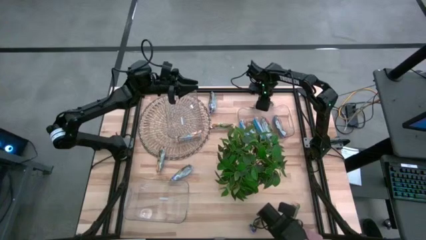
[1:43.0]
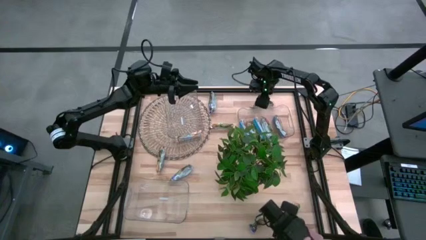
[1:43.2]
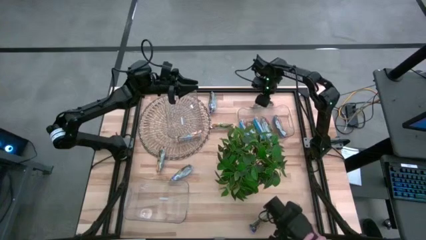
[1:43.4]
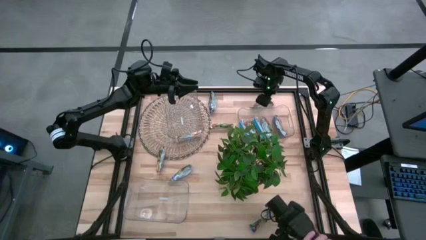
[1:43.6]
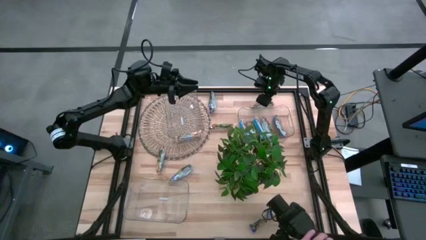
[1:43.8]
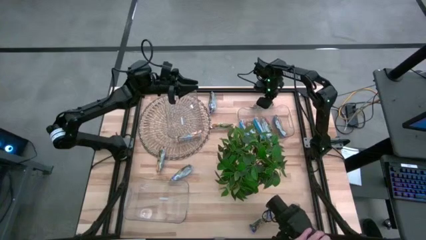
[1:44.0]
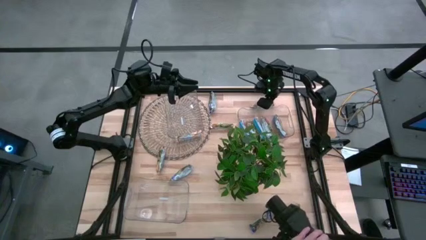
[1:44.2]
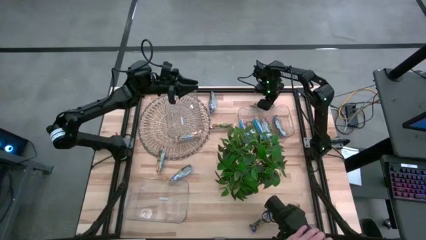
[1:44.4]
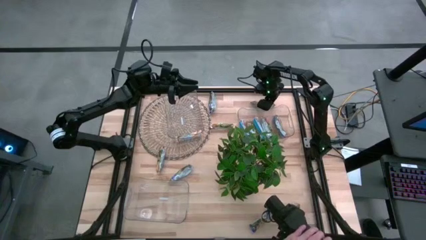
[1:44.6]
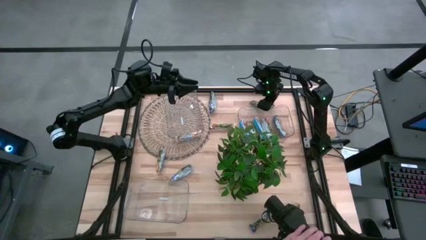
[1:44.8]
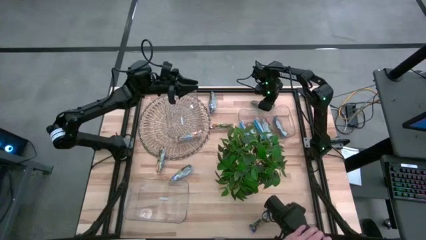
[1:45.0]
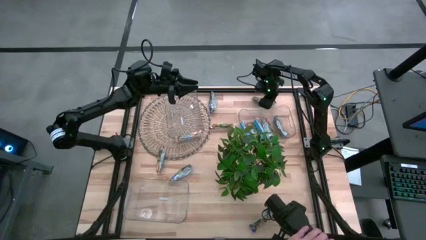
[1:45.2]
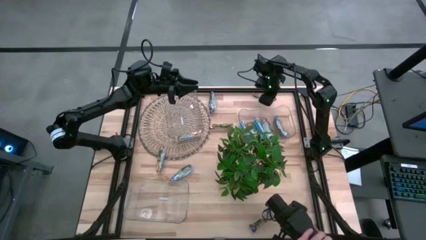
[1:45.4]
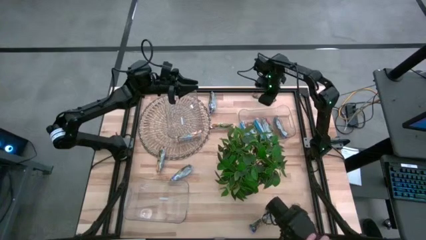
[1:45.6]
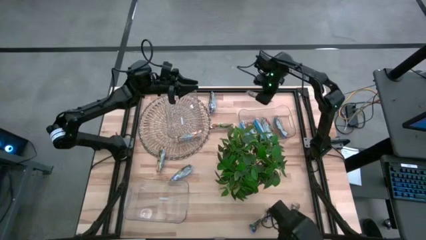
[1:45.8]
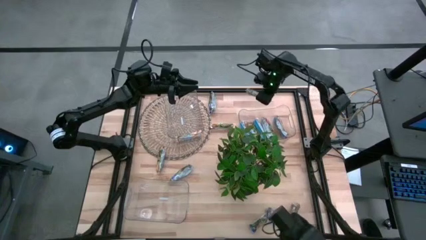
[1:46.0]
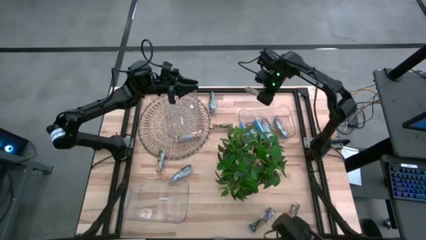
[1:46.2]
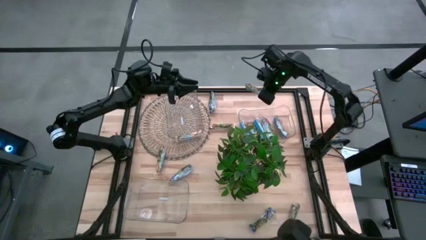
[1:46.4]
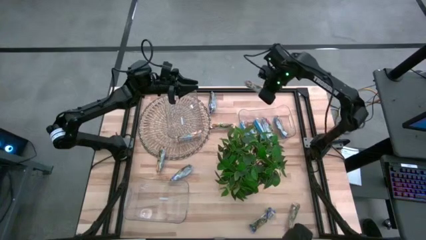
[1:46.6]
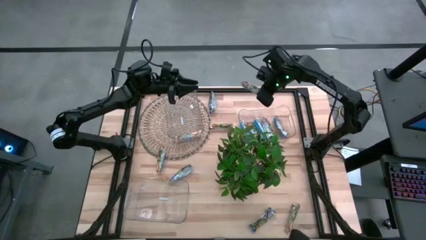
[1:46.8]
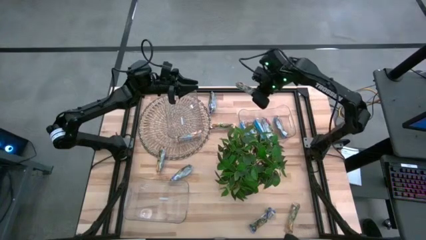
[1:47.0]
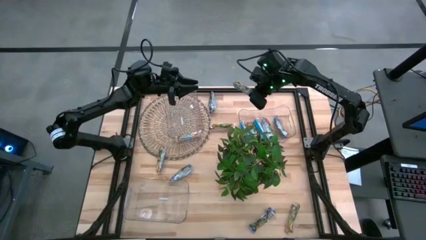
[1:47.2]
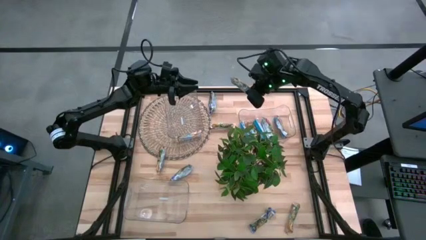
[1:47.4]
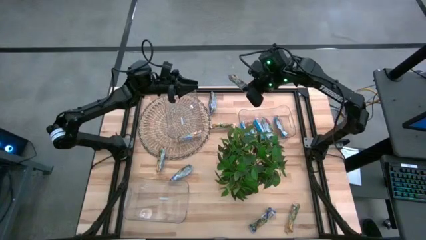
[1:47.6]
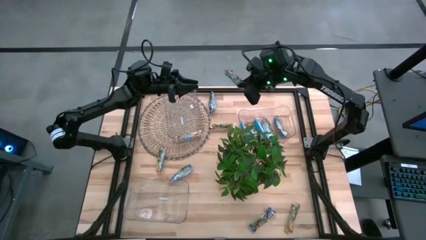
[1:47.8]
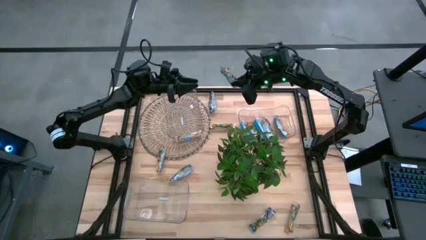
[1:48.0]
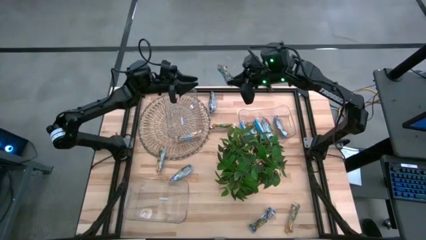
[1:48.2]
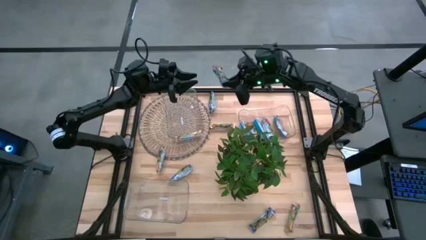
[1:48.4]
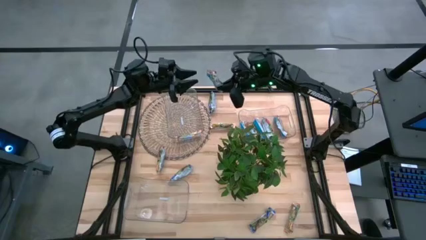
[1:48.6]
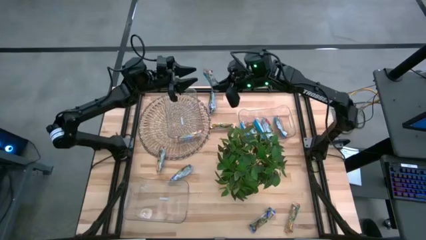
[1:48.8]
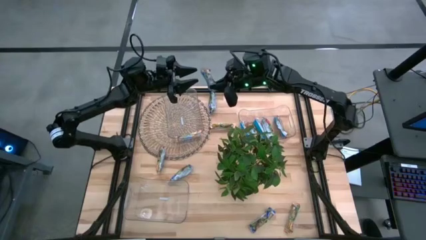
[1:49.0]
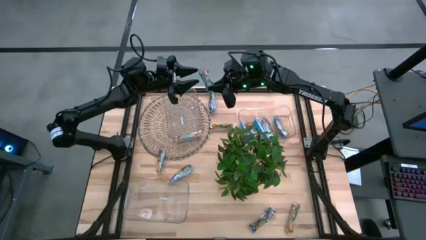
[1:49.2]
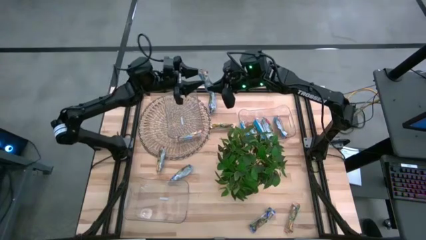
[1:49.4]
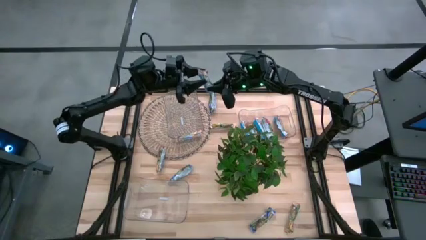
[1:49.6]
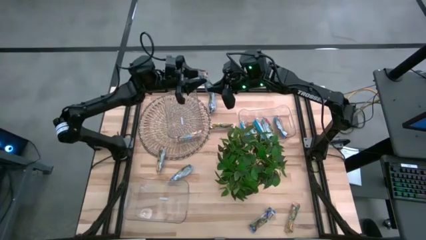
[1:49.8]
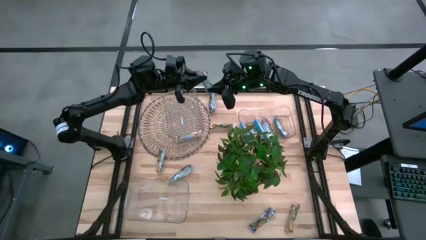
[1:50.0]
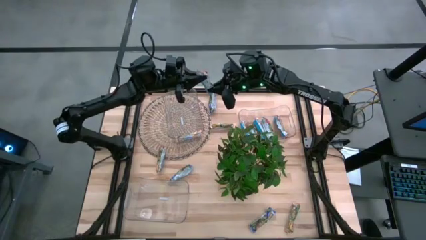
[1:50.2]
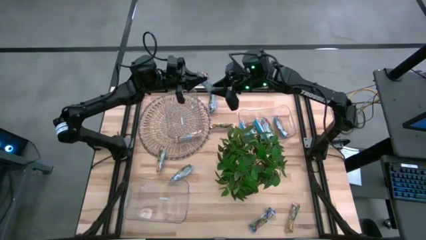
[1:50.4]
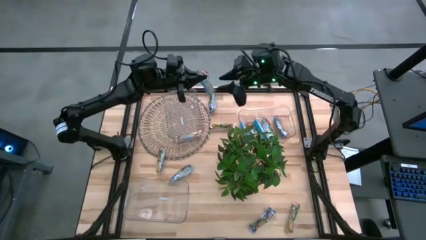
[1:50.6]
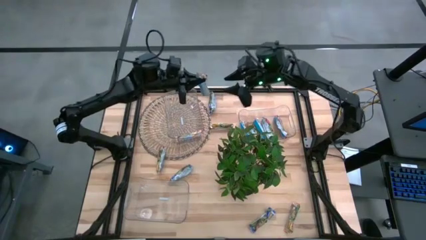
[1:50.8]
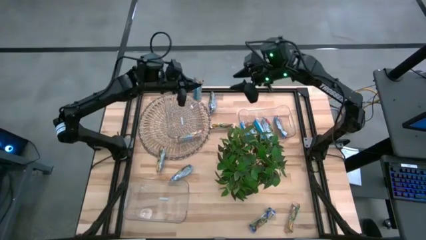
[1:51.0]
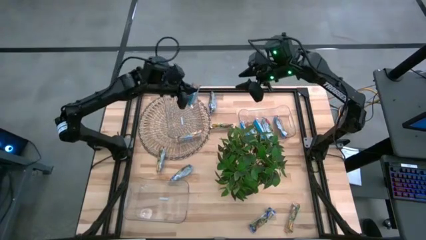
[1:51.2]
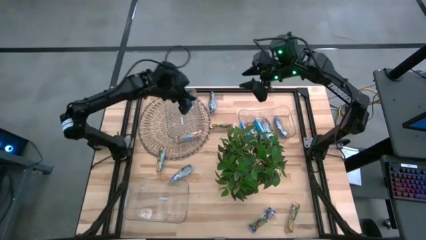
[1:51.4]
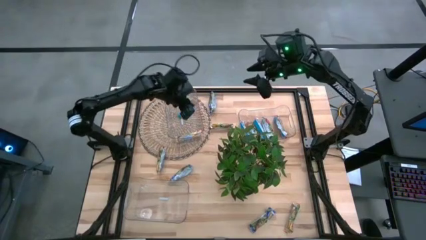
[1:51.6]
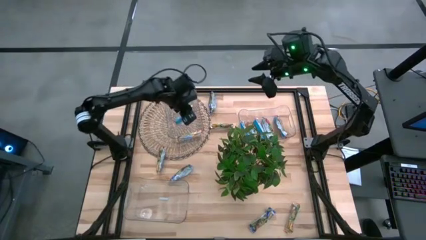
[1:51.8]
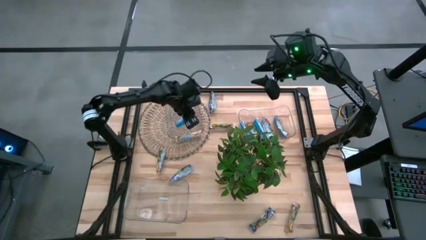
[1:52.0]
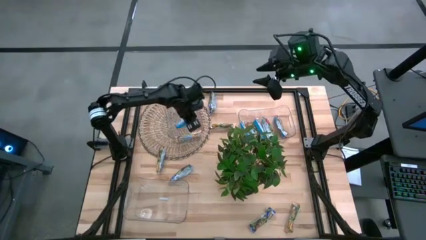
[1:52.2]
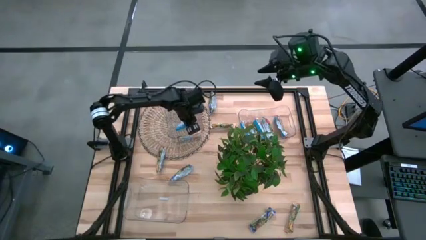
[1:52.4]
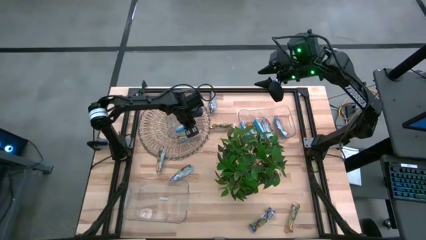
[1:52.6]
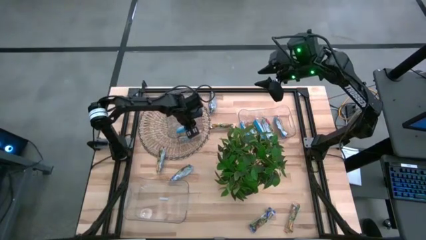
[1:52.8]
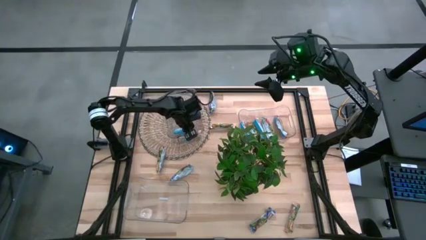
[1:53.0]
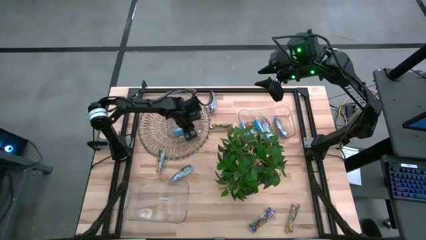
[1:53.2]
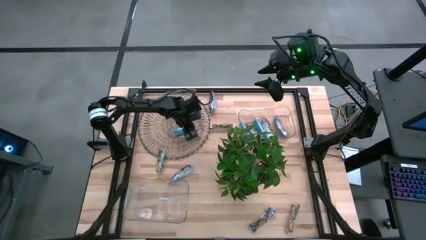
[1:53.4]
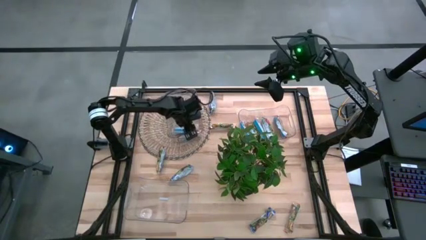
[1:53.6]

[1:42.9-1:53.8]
Task: Pick and place Granola Bars by type
Put the top right yellow granola bar into the top left transparent bin

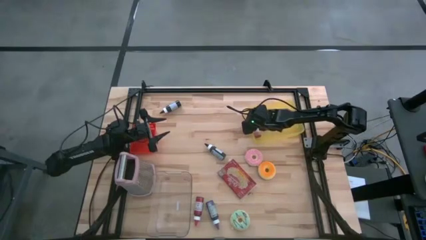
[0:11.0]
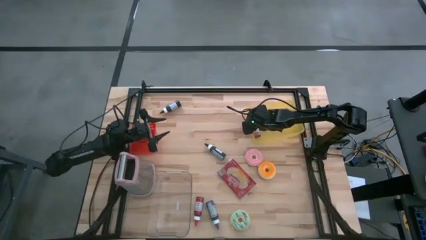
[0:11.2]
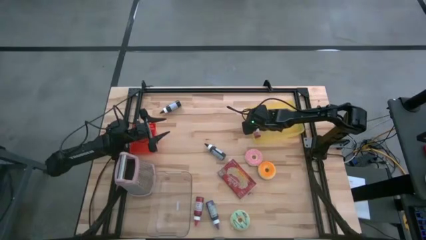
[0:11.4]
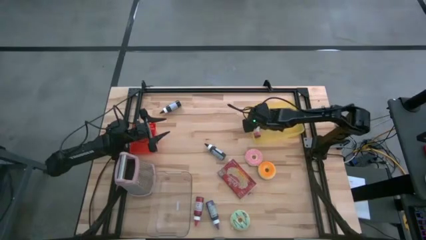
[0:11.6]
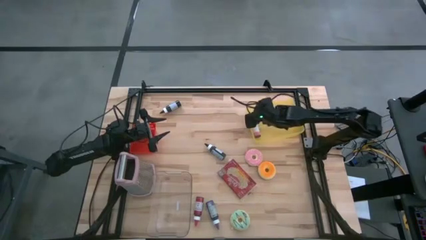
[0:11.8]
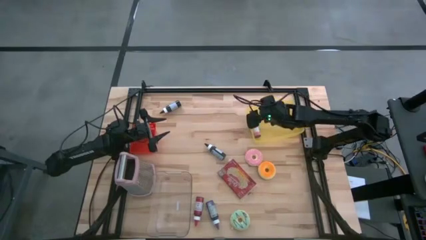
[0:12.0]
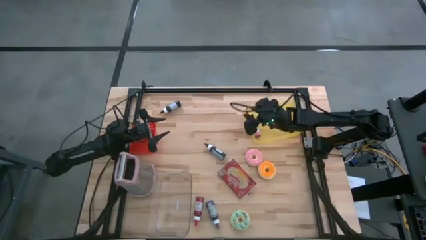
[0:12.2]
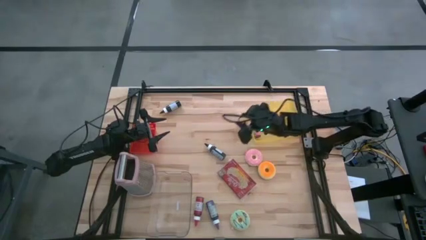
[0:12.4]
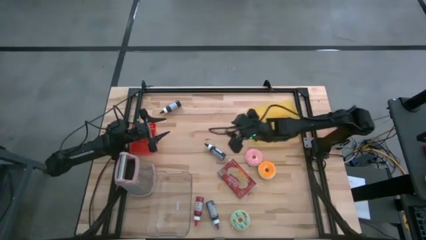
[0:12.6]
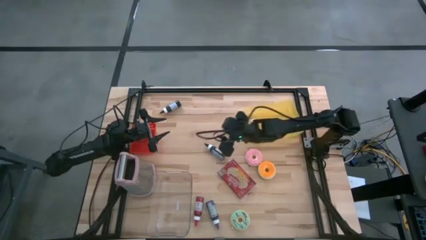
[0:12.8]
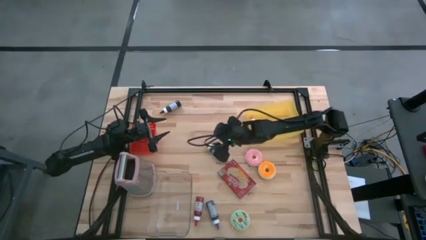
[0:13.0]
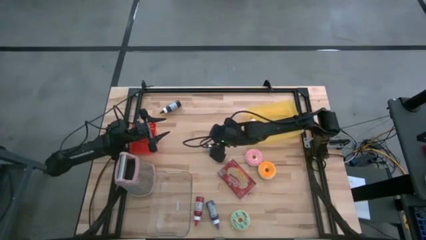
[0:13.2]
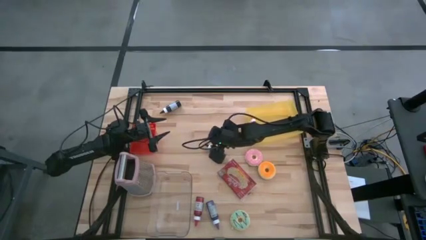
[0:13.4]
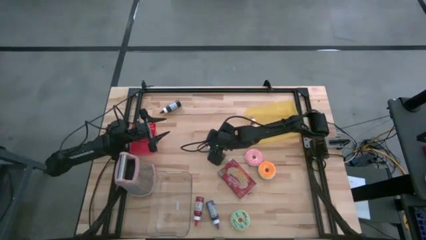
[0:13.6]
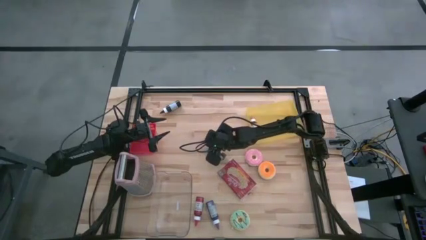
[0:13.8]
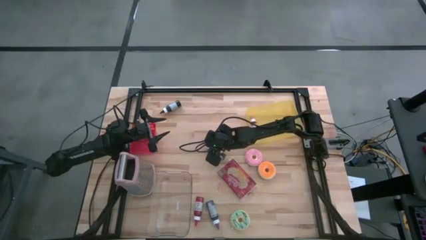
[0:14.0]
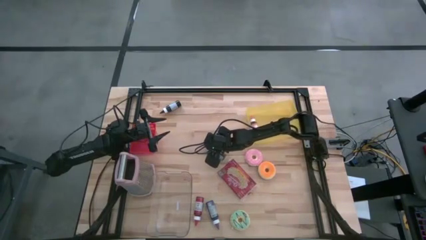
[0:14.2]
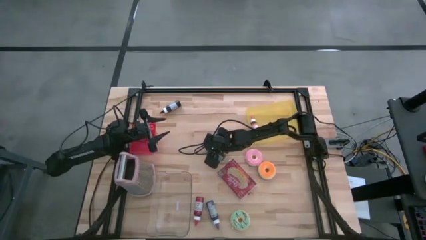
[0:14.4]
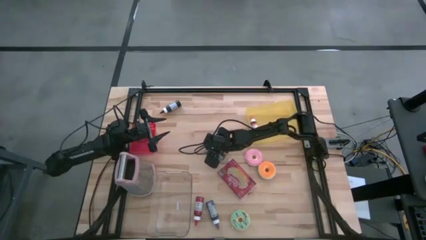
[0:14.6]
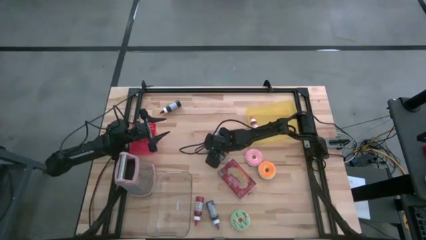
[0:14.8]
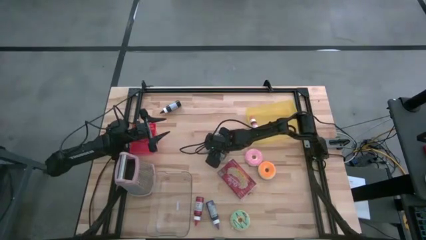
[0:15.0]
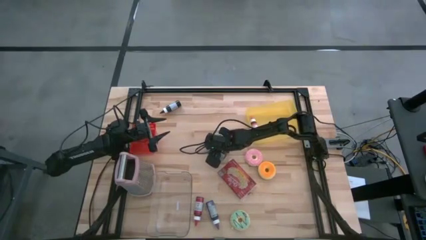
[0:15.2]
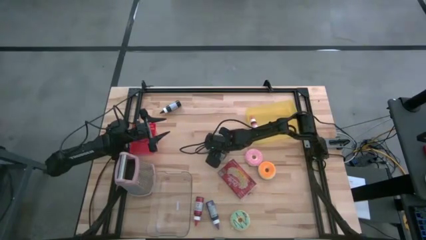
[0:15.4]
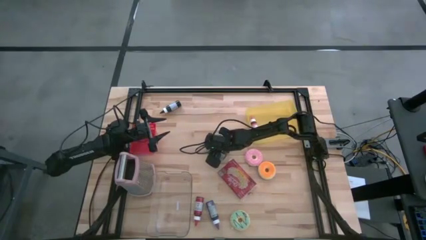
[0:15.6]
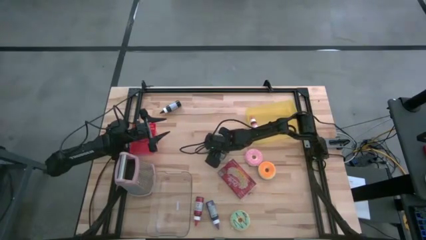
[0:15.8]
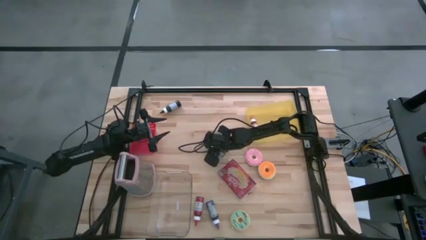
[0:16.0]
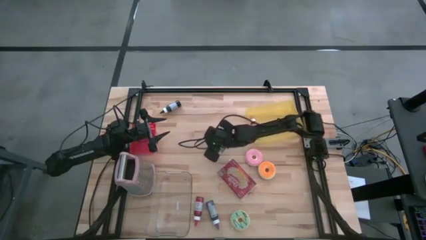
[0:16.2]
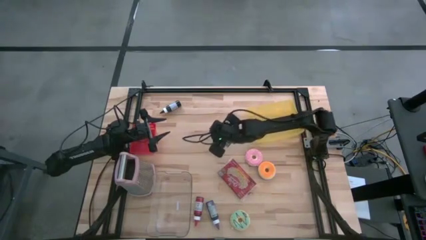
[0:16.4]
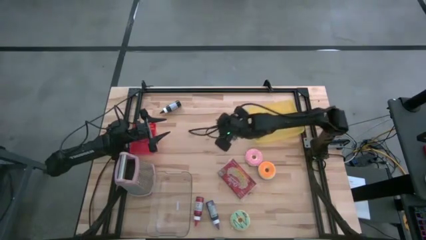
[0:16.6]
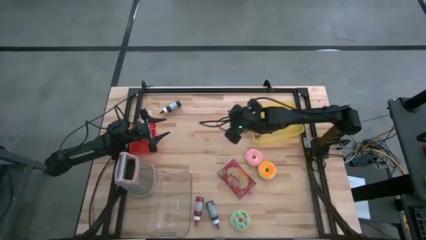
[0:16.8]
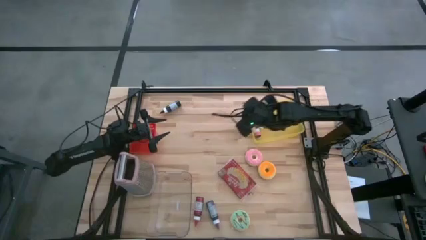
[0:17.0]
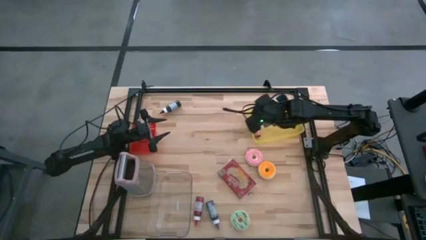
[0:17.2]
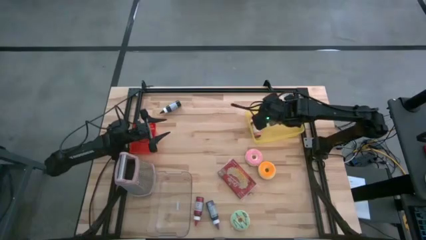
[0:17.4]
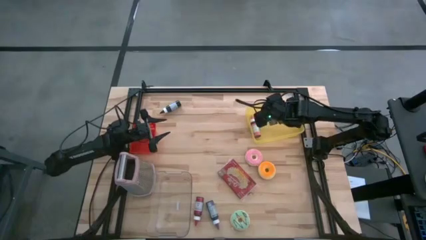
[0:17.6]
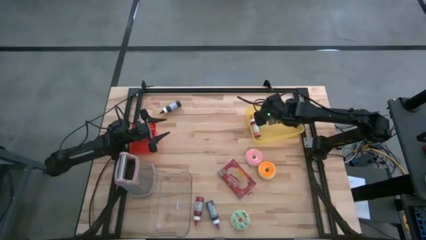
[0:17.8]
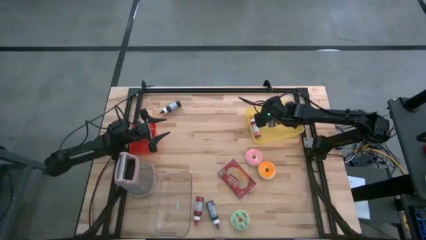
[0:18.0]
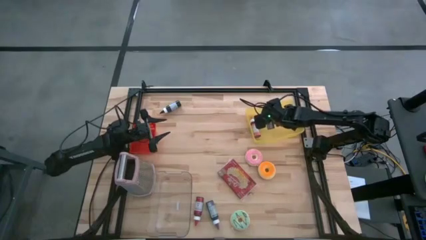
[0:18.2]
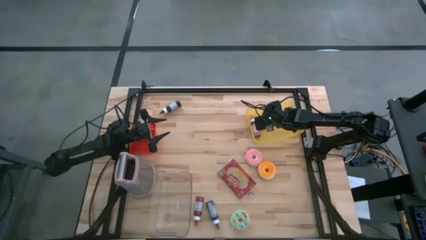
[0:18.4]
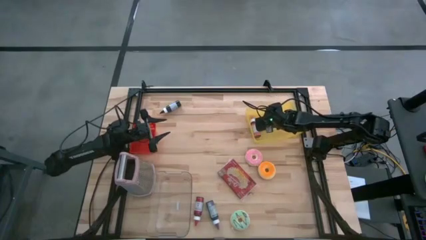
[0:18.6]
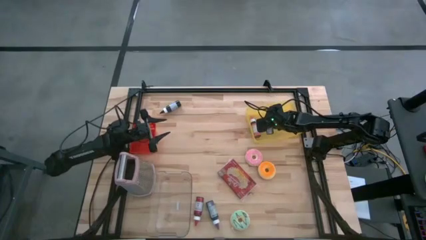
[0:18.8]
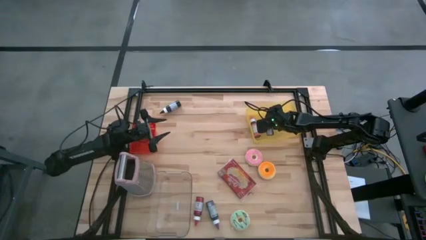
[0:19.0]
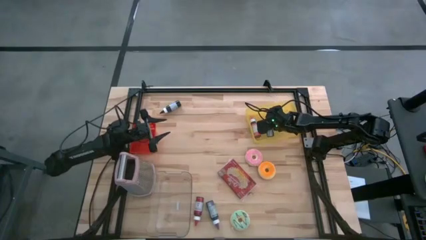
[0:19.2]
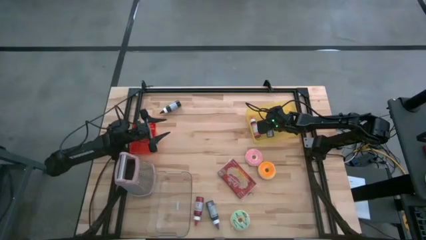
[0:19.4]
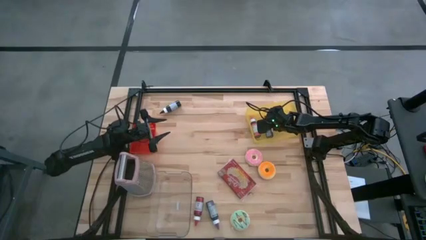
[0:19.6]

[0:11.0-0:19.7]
Task: Pick & Place Food Item
Put the bottom black food coloring bottle into the yellow bin
